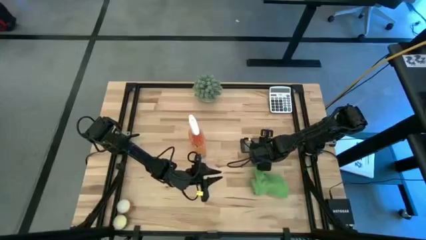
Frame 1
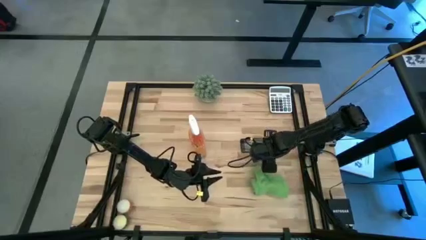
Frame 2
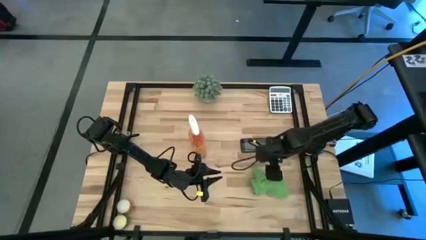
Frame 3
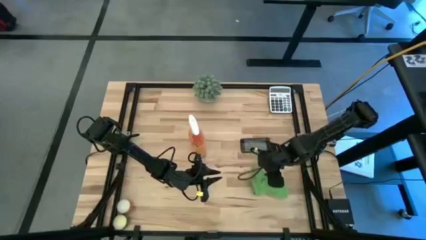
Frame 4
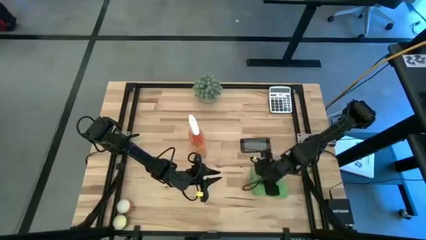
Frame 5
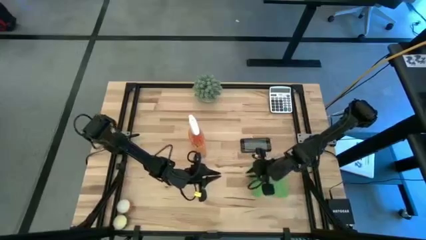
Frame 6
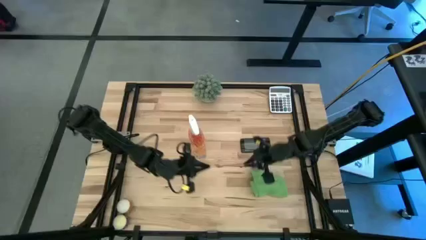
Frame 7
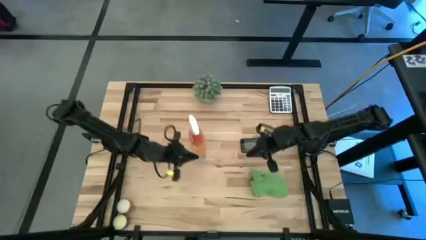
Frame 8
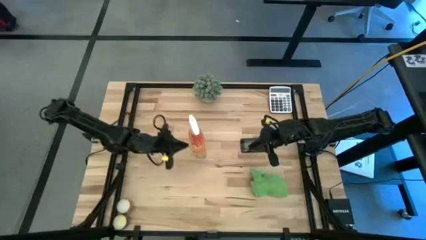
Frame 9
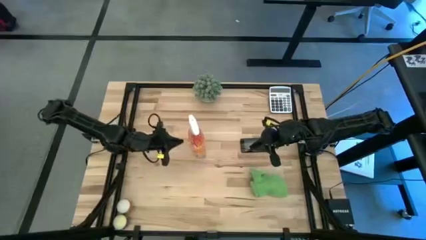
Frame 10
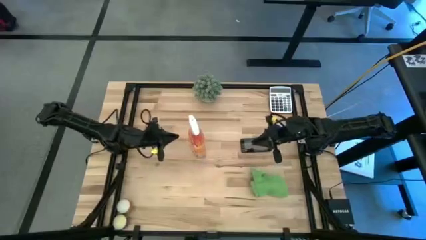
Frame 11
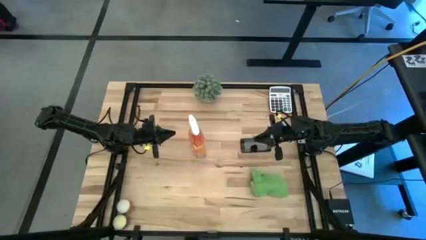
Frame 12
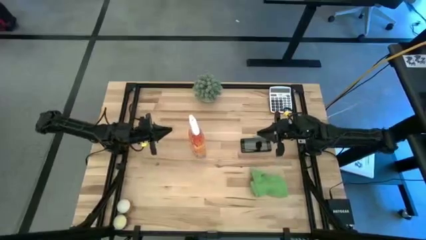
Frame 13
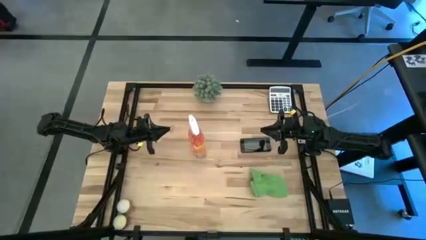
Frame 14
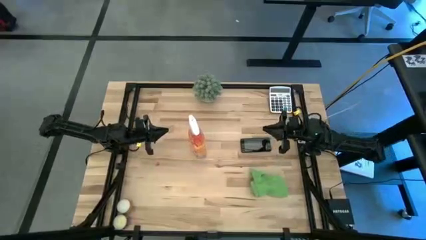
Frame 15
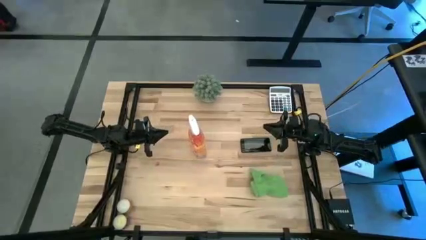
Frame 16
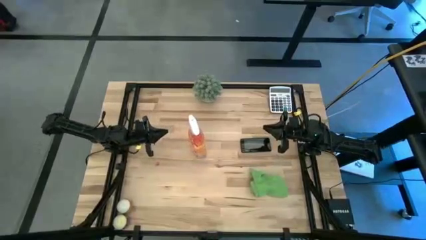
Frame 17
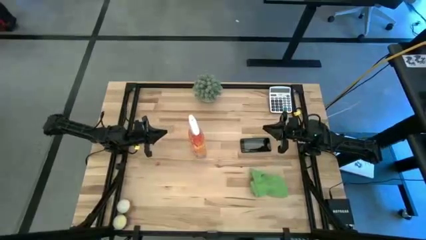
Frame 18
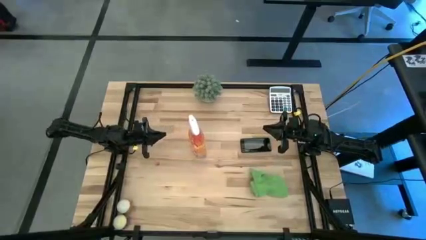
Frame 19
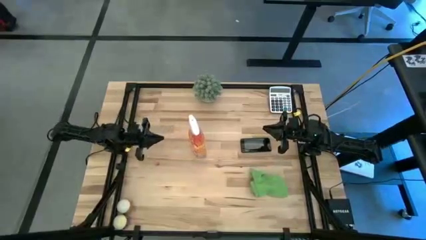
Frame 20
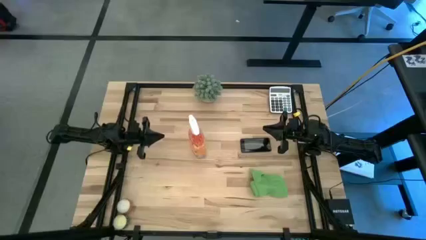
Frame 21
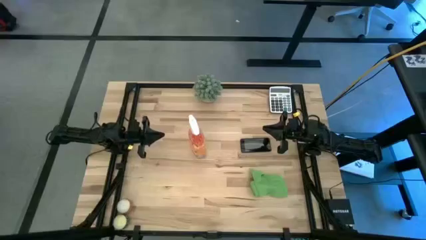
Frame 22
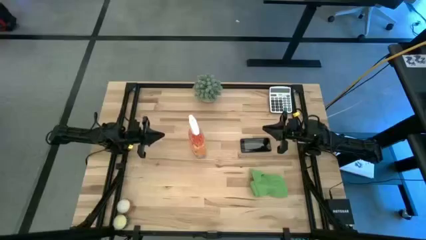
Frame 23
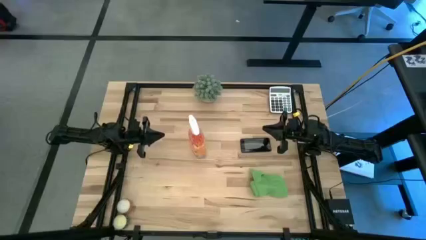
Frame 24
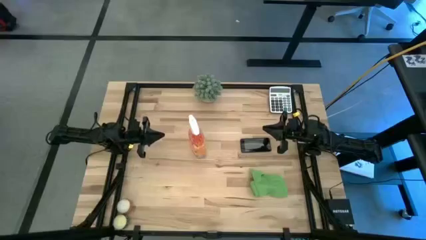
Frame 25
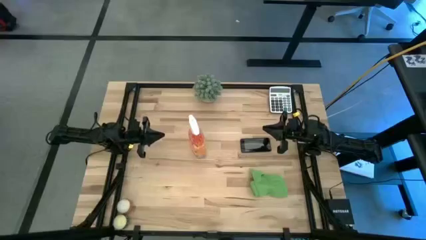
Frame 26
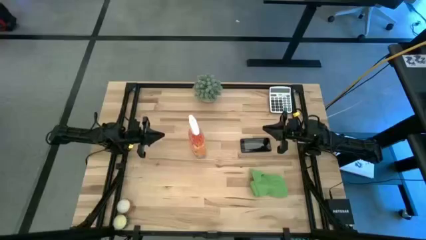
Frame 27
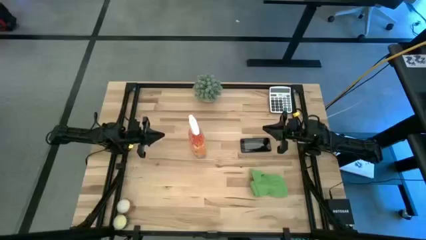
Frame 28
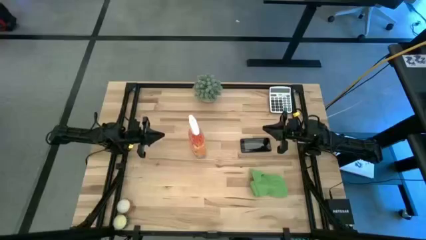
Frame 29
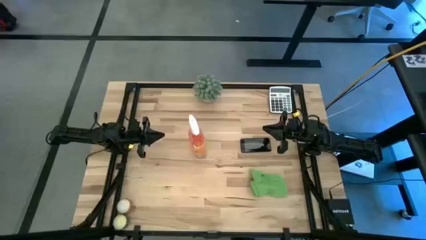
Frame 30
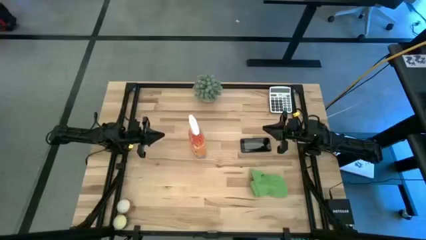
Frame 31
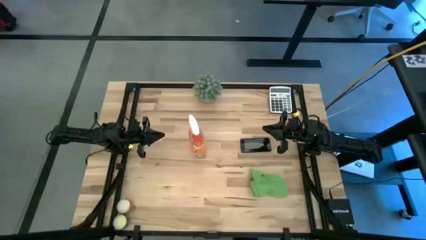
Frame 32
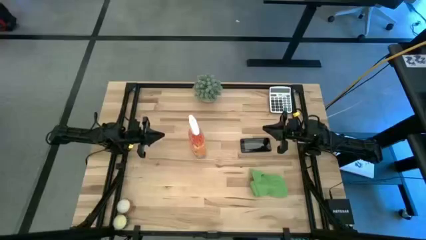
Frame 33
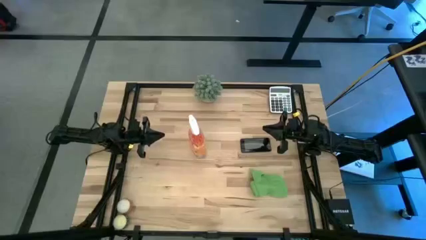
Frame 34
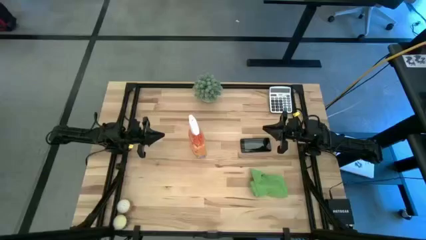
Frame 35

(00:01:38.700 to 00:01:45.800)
Task: Apply microfiber cloth
Return to Home Position

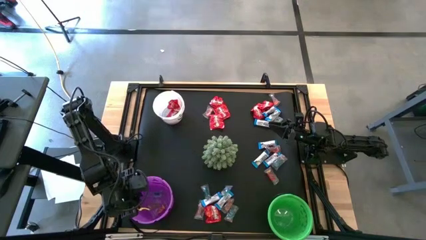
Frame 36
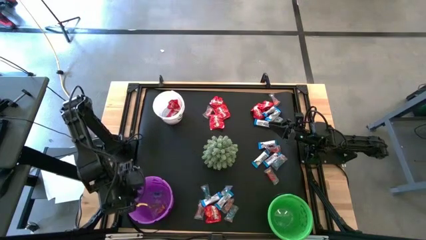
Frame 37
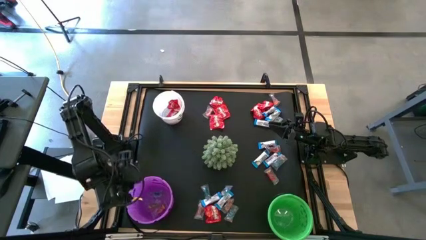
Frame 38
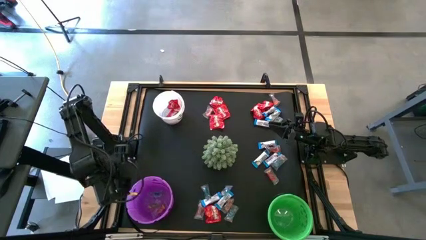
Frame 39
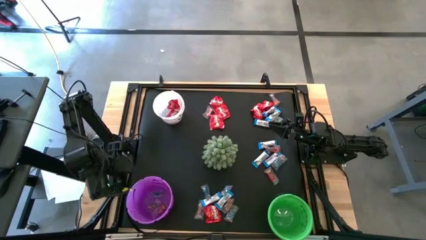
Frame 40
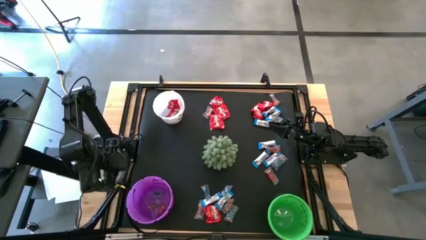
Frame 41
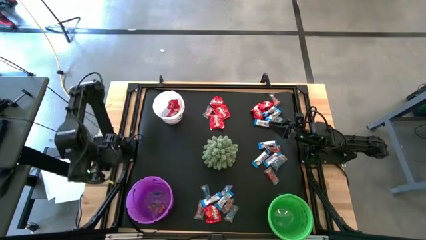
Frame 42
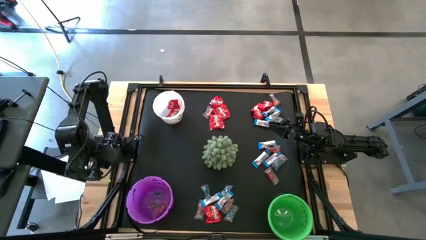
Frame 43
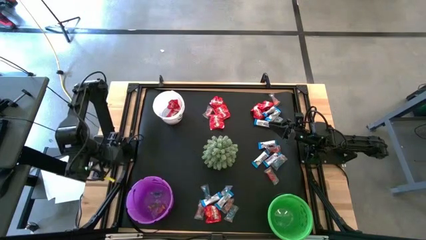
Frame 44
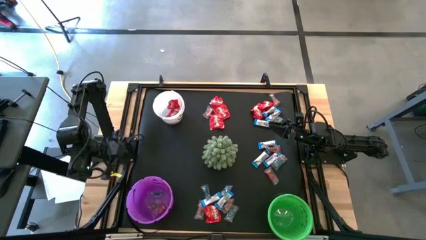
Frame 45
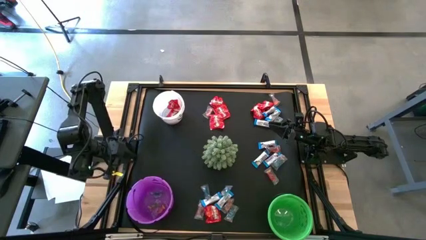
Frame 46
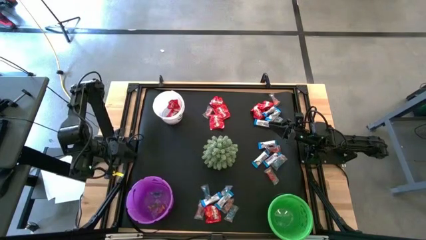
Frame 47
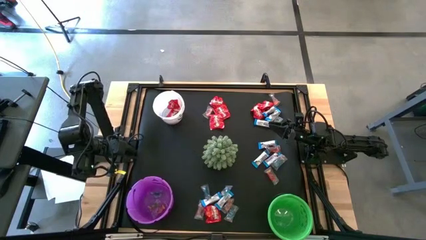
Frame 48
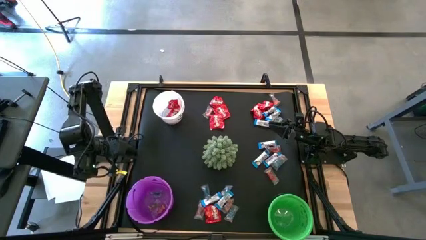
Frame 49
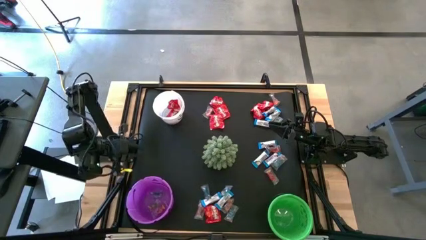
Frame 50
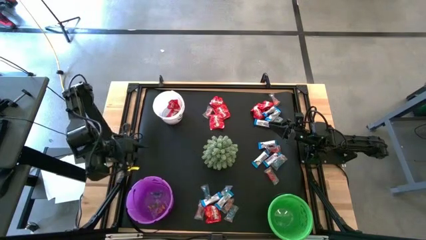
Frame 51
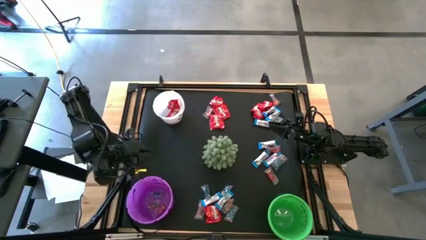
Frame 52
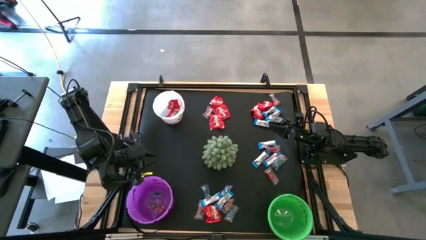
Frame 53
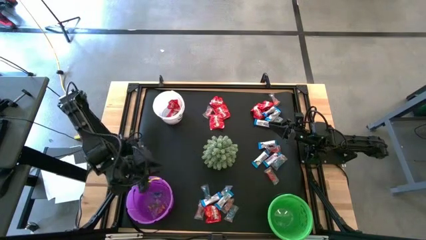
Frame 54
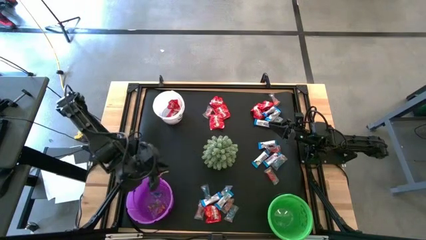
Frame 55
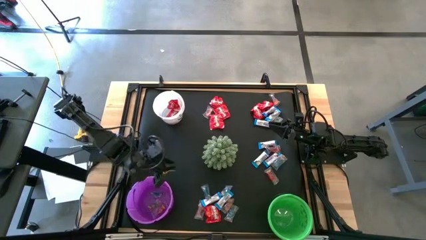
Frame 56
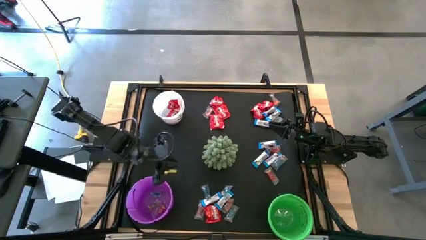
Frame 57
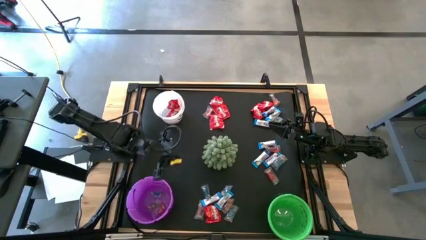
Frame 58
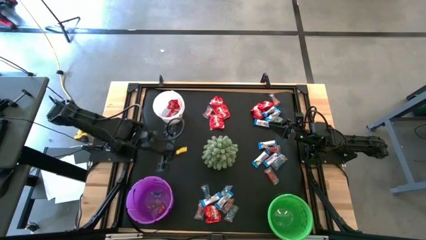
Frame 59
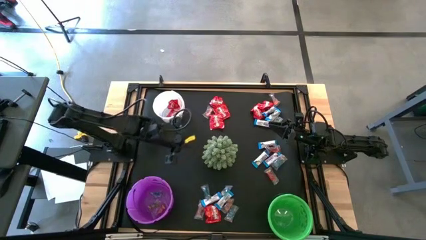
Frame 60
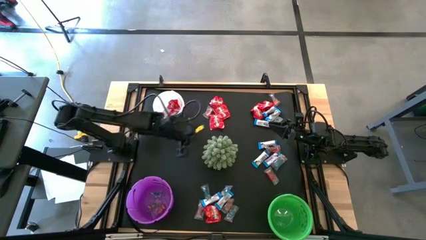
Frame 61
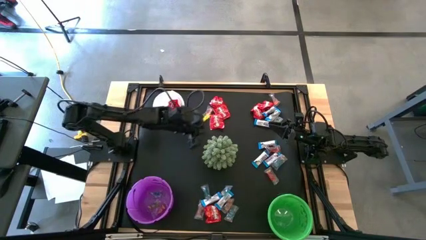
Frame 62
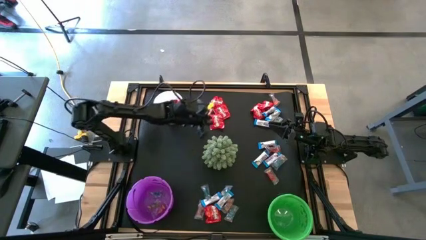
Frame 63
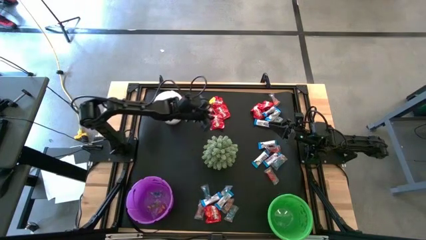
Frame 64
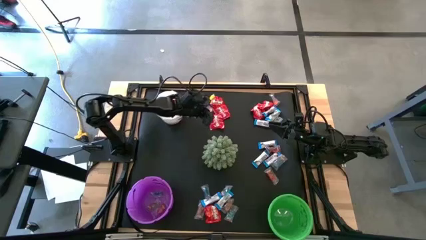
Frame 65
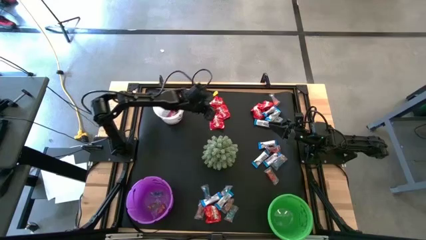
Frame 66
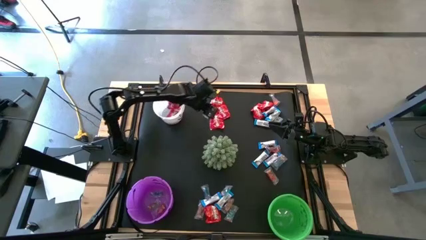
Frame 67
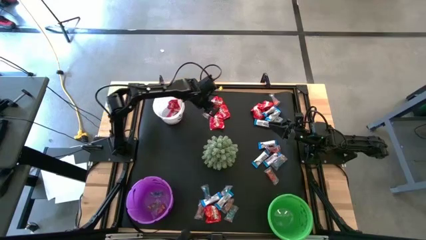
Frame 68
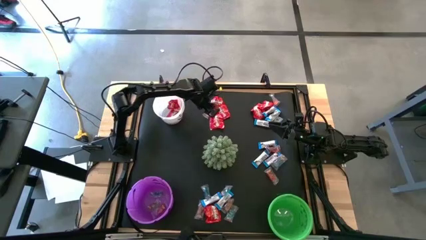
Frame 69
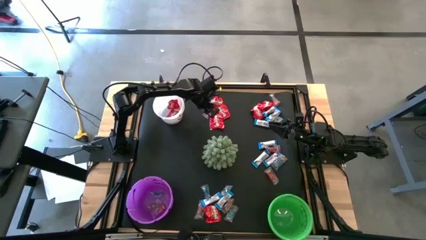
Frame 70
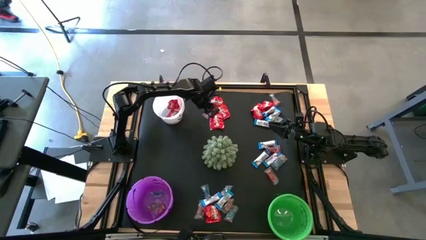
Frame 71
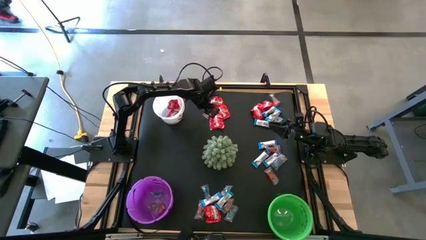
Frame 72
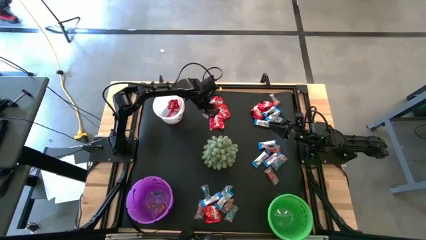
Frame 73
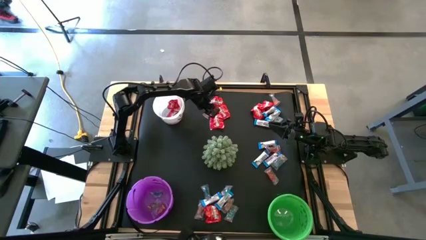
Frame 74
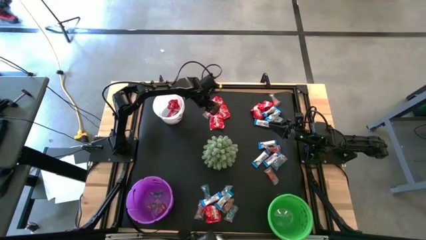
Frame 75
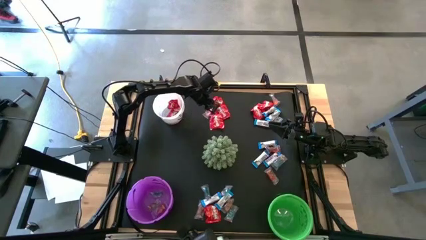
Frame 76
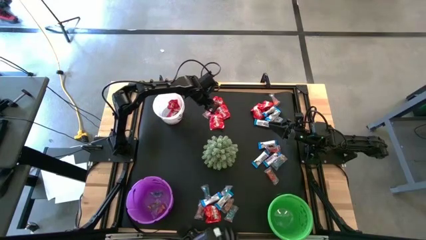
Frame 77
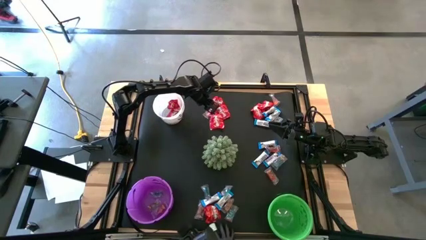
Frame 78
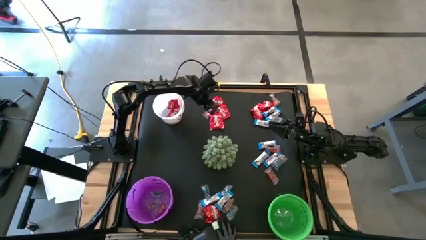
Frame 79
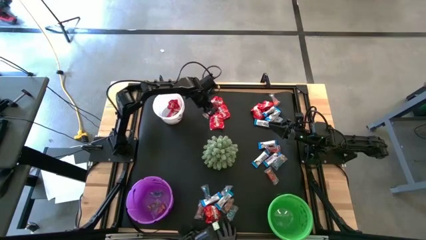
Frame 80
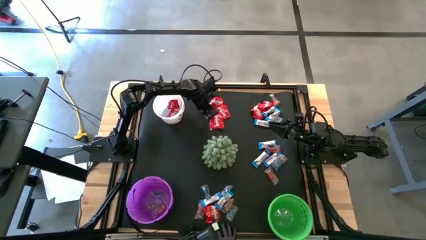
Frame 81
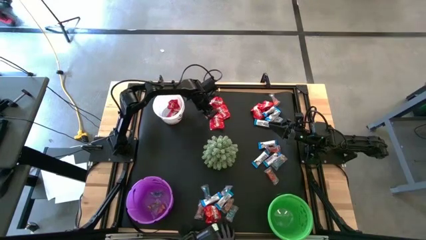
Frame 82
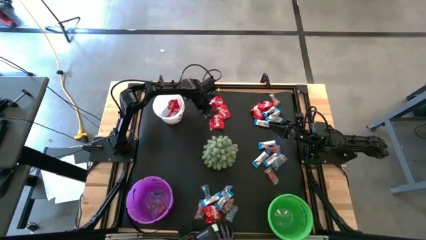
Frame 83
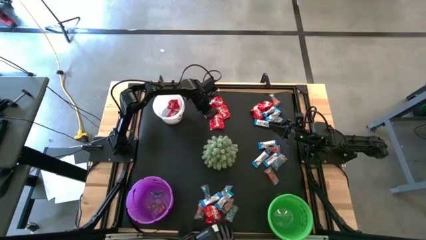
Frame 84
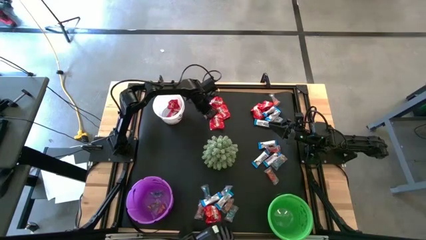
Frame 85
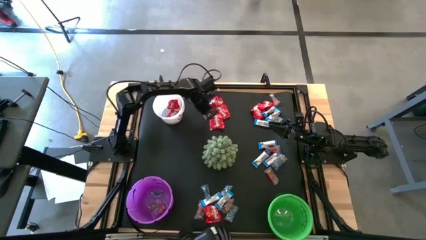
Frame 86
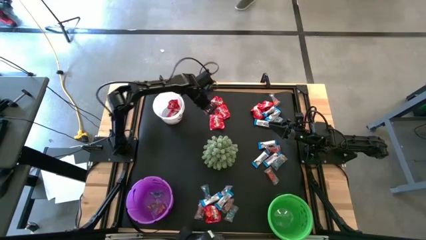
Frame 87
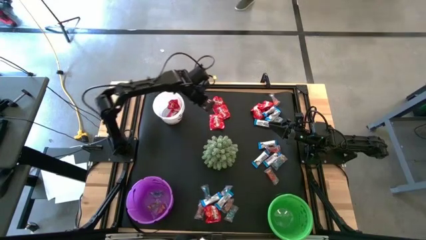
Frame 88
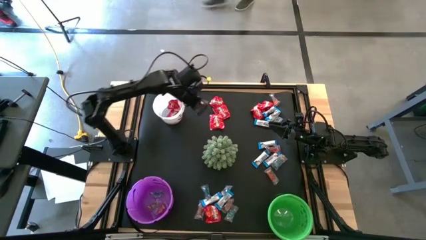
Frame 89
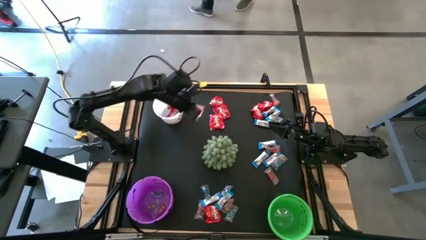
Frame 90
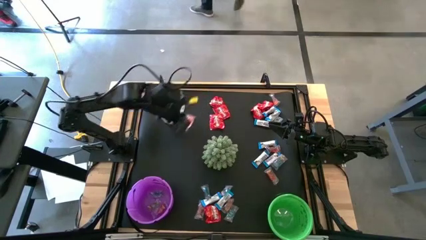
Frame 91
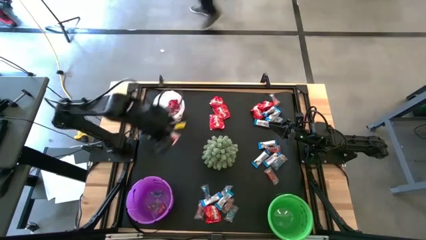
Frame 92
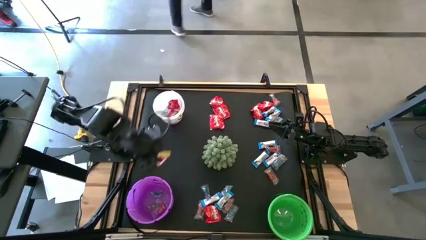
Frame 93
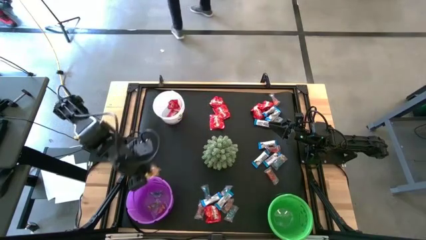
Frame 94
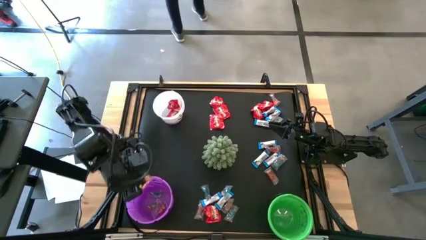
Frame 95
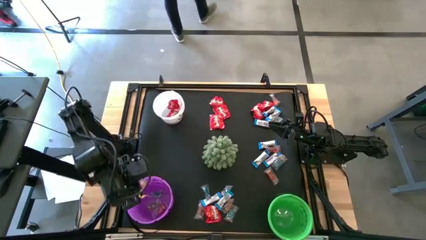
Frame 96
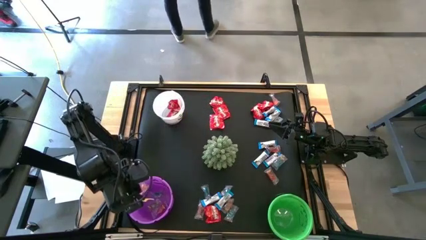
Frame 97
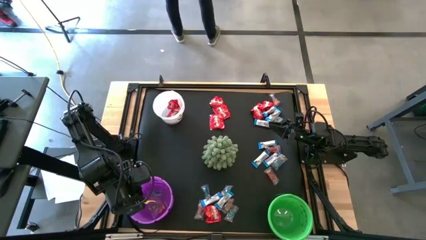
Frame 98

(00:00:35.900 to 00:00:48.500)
Task: Organize candy in baskets
Put the orange gummy into the purple bucket
